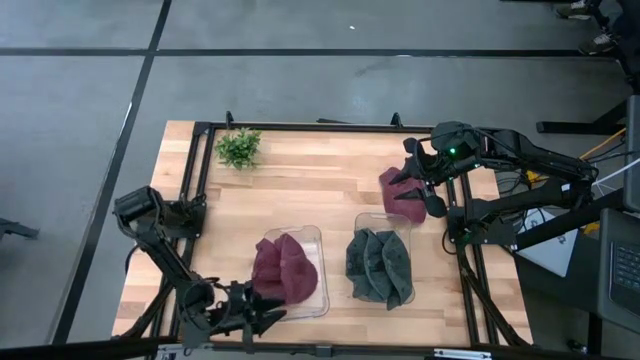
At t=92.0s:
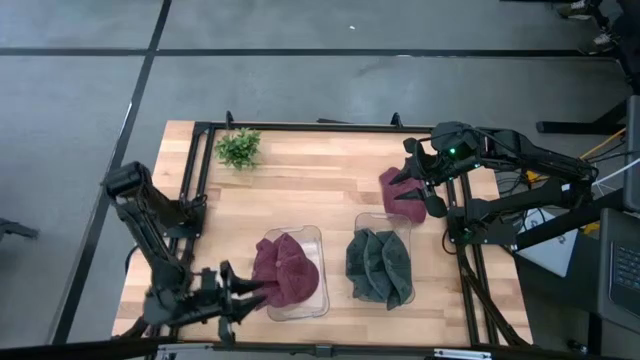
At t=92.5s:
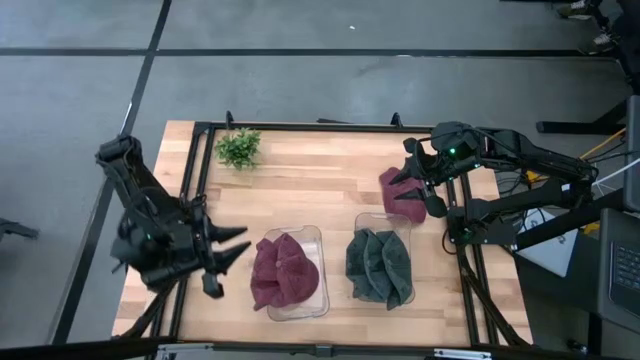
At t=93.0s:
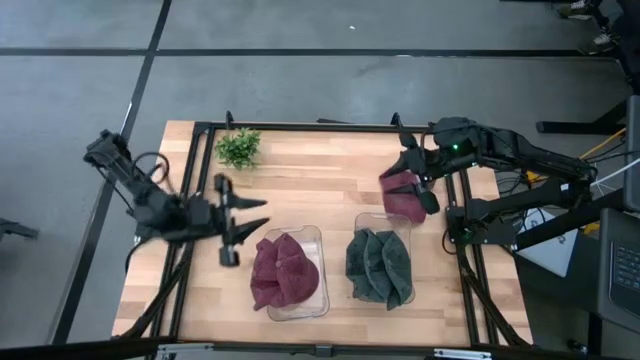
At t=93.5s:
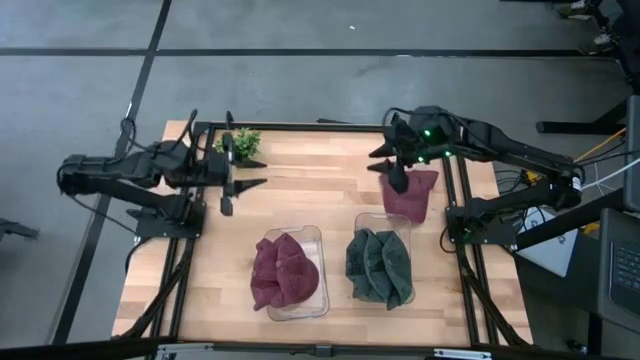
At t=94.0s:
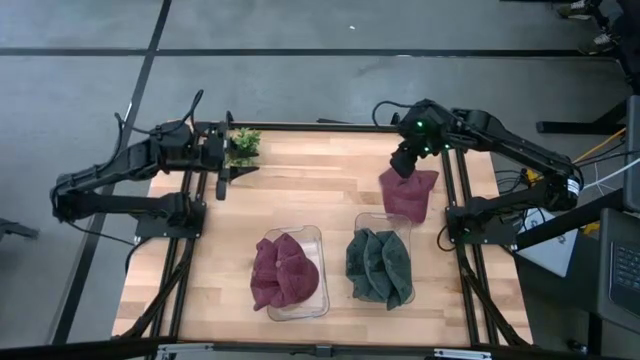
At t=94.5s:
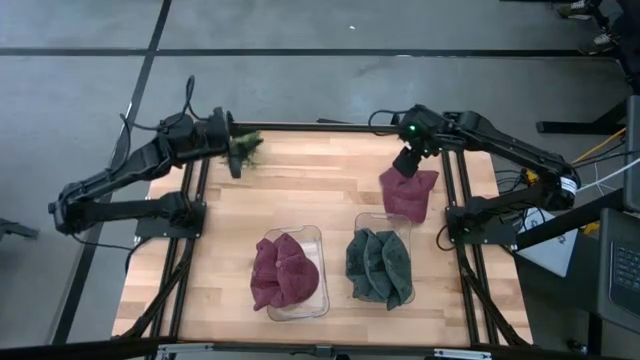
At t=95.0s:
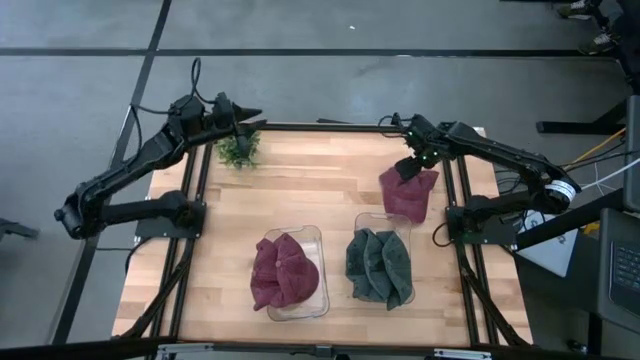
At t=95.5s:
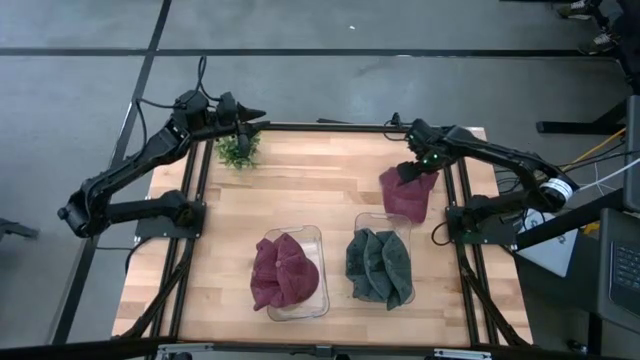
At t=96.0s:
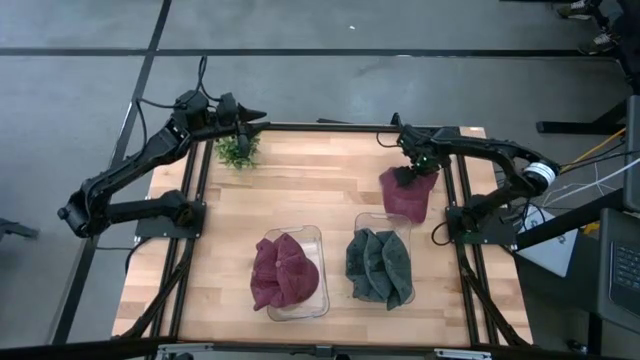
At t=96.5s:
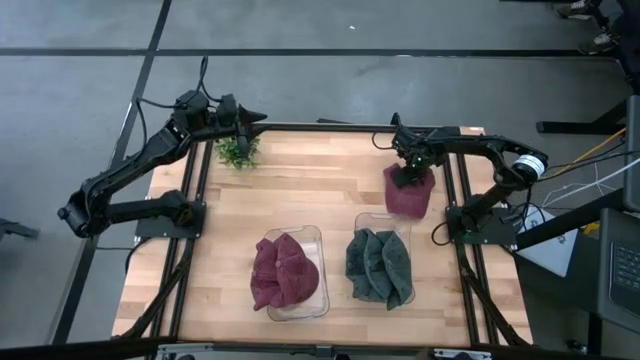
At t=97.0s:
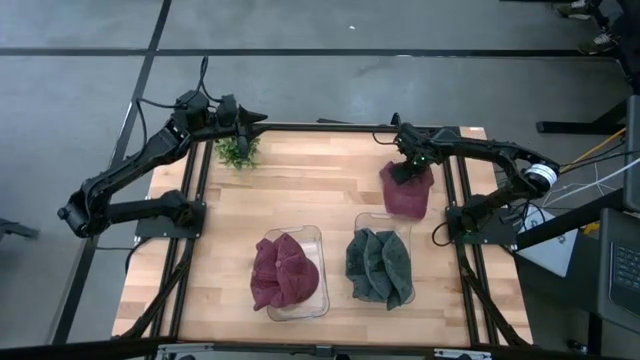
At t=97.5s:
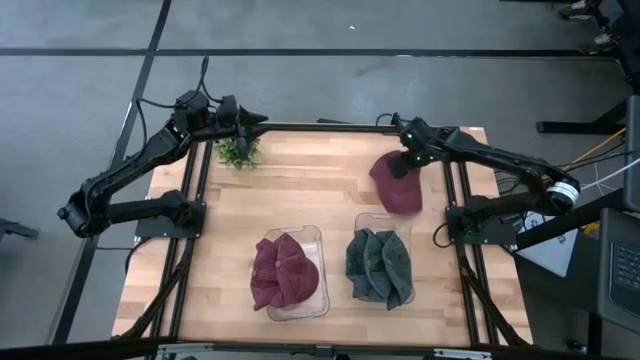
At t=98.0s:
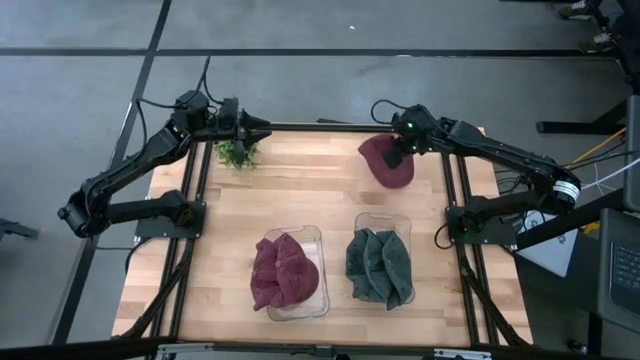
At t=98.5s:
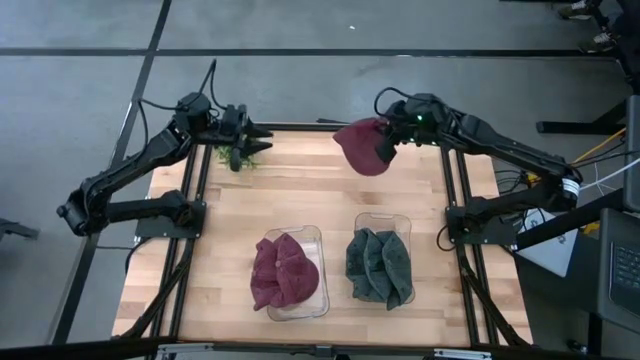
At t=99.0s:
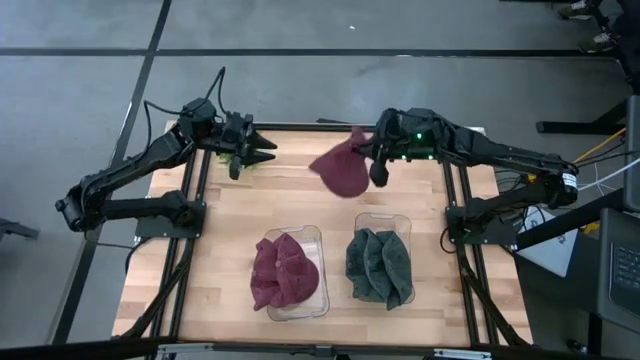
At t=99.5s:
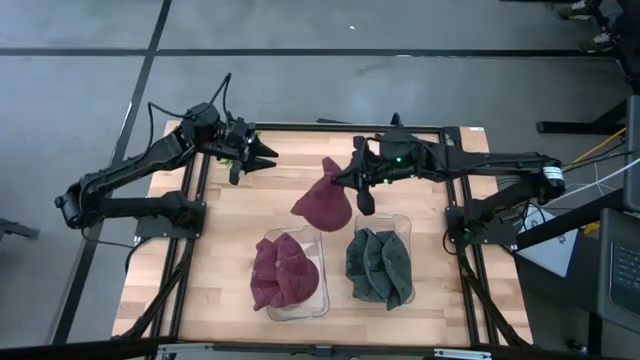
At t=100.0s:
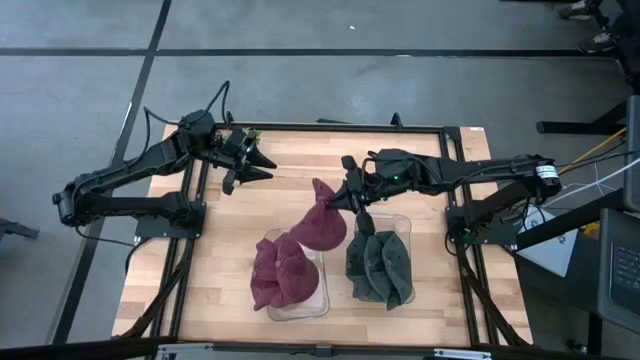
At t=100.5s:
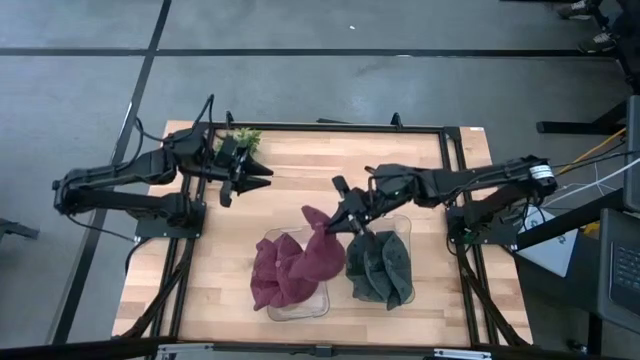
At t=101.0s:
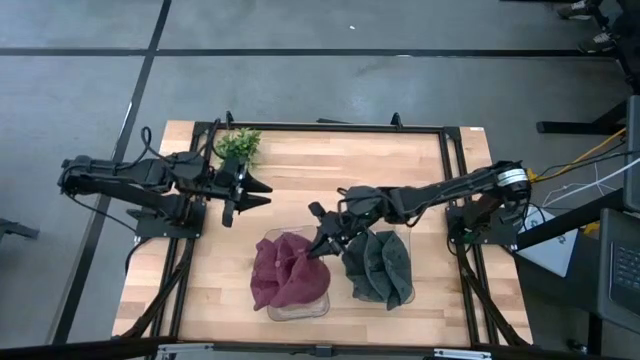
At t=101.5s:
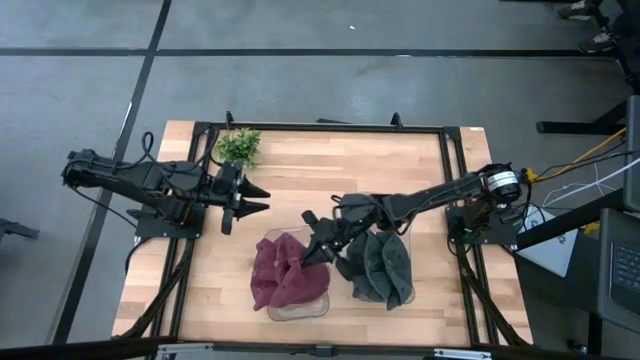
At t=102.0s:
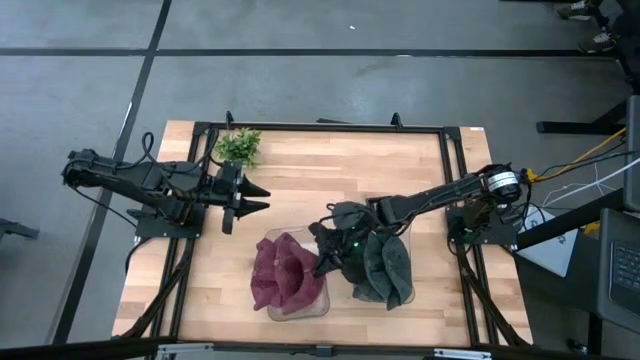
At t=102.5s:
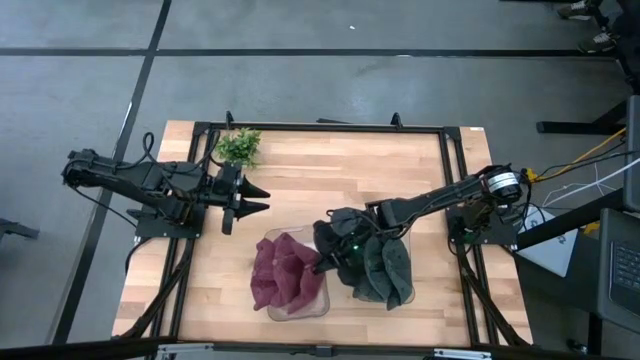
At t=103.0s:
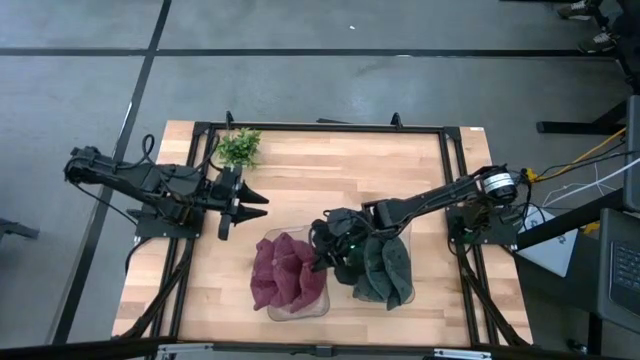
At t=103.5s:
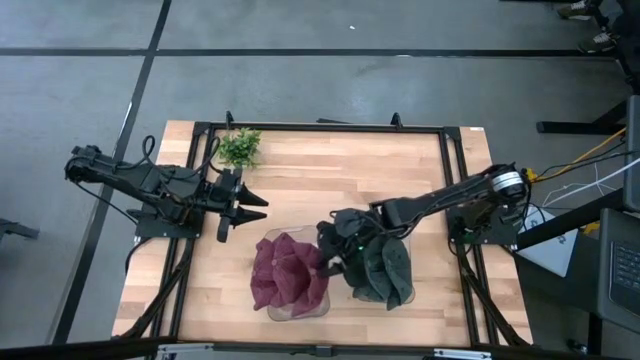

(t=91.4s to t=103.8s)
Task: Pick & Place hat
Put the pink cap in the left transparent bin

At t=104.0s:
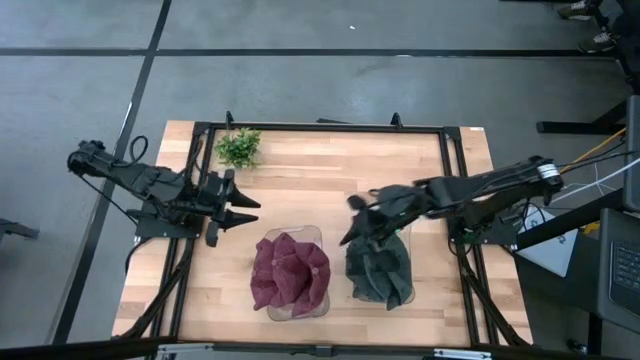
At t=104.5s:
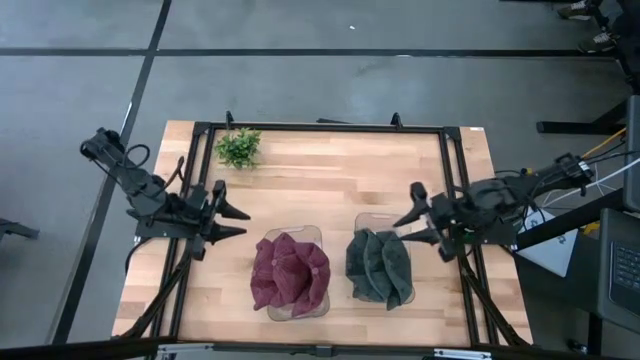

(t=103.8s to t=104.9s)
Return to Home Position
